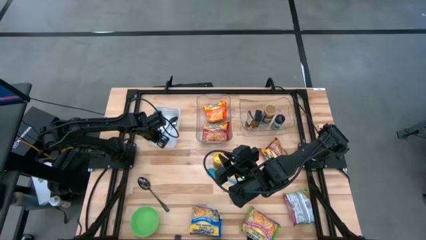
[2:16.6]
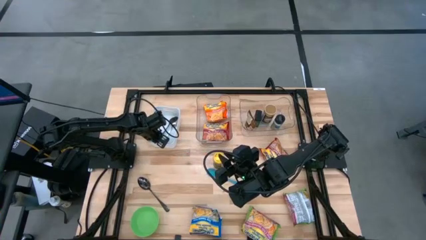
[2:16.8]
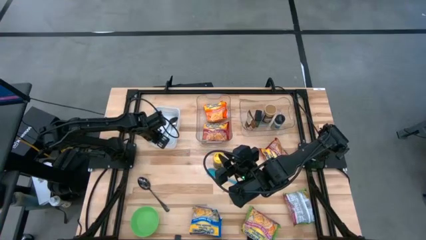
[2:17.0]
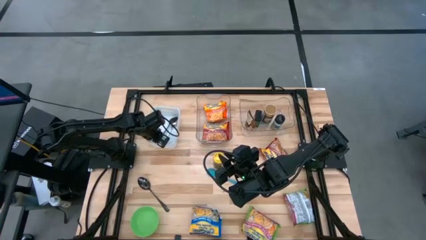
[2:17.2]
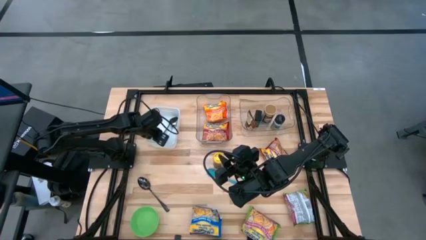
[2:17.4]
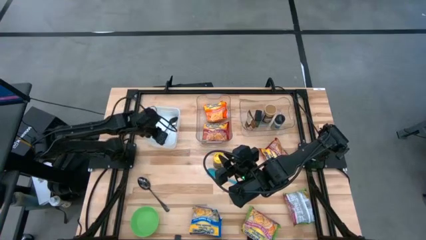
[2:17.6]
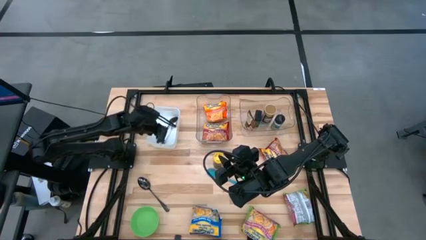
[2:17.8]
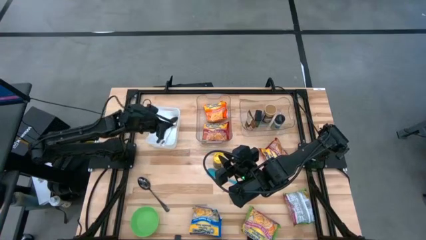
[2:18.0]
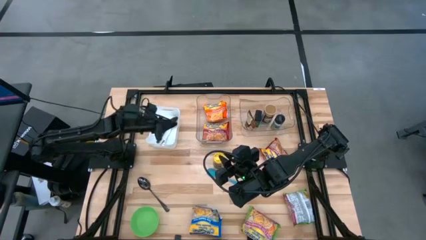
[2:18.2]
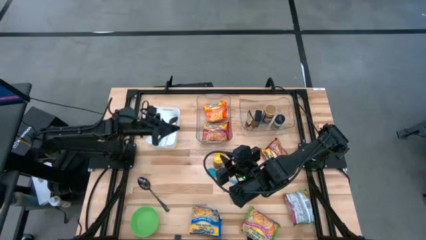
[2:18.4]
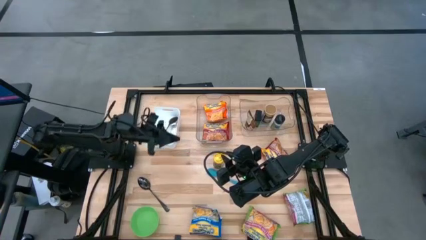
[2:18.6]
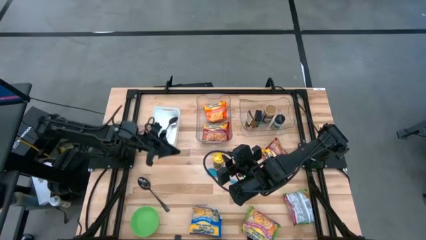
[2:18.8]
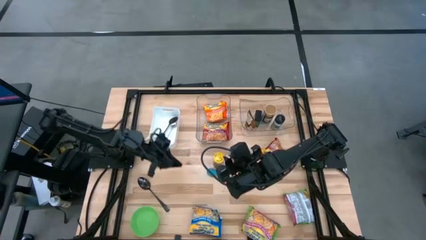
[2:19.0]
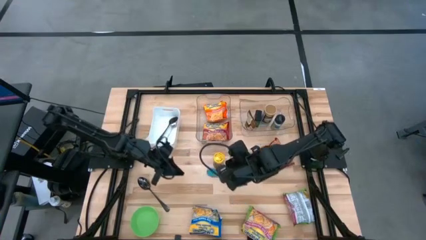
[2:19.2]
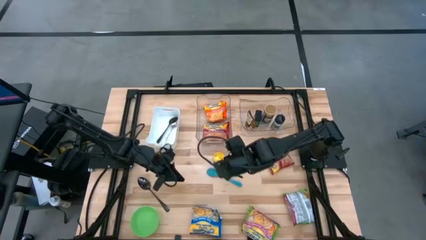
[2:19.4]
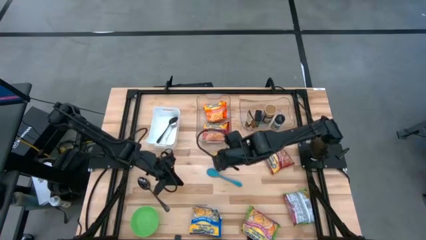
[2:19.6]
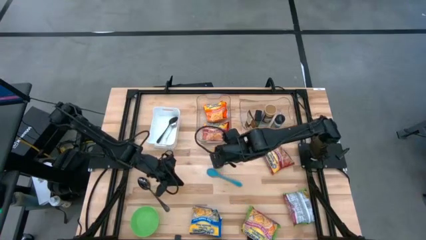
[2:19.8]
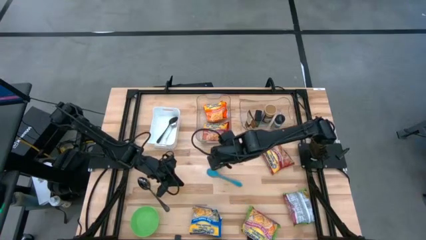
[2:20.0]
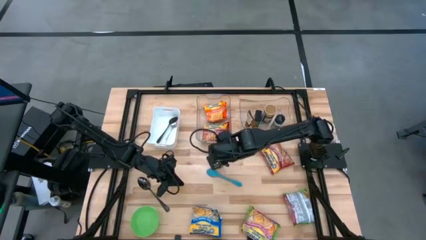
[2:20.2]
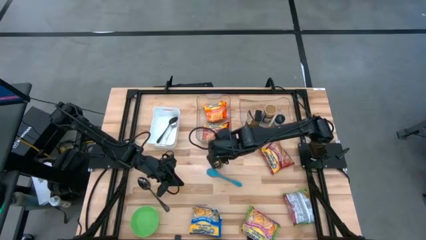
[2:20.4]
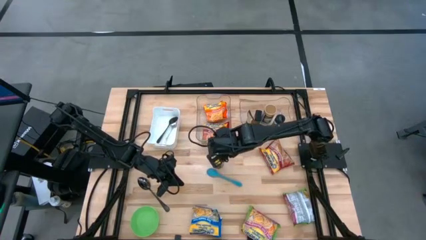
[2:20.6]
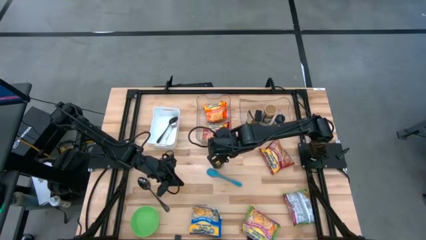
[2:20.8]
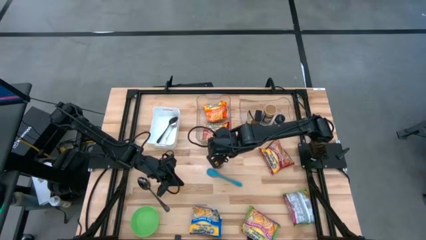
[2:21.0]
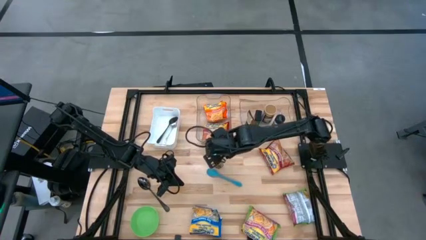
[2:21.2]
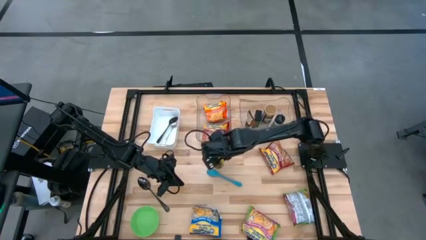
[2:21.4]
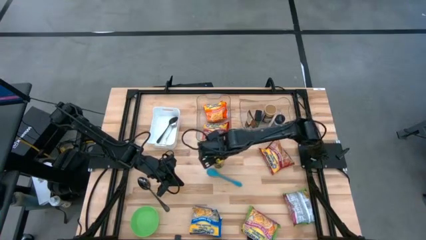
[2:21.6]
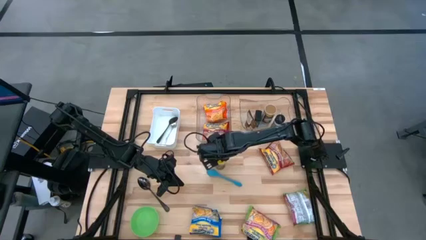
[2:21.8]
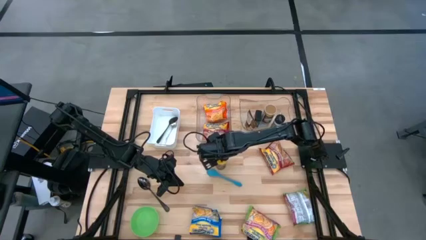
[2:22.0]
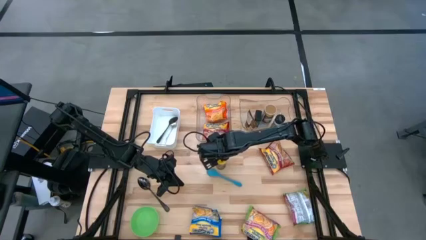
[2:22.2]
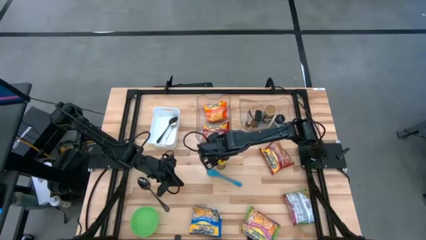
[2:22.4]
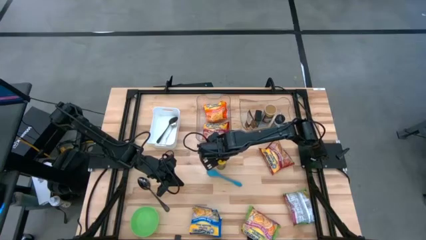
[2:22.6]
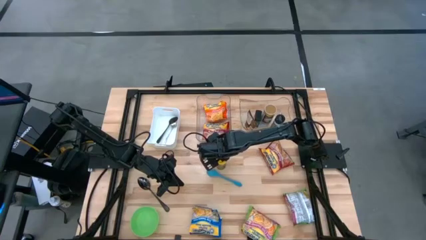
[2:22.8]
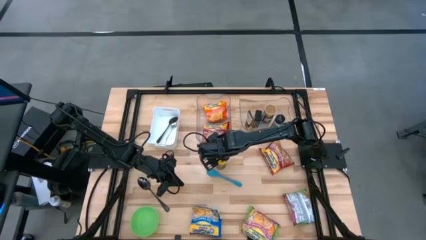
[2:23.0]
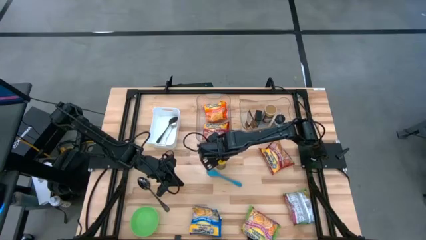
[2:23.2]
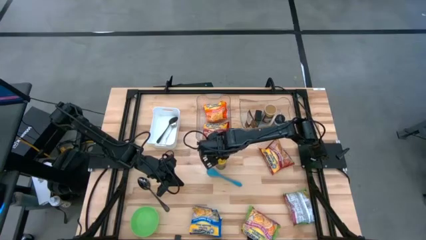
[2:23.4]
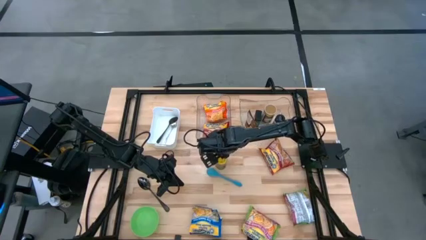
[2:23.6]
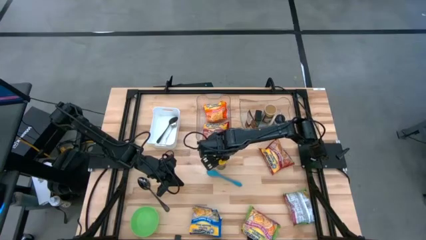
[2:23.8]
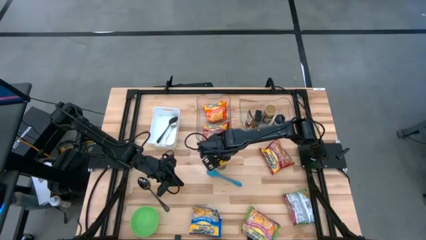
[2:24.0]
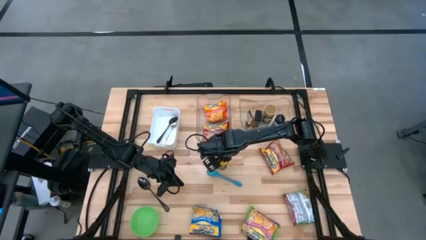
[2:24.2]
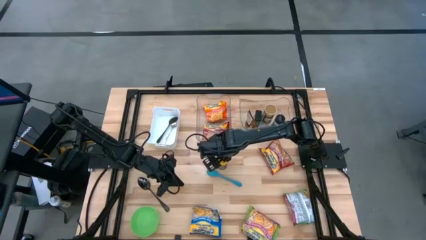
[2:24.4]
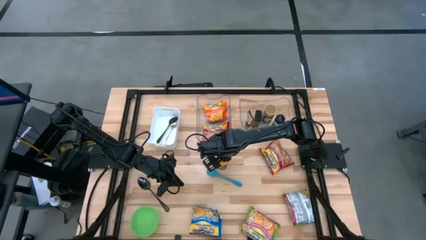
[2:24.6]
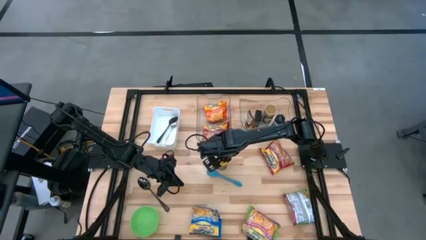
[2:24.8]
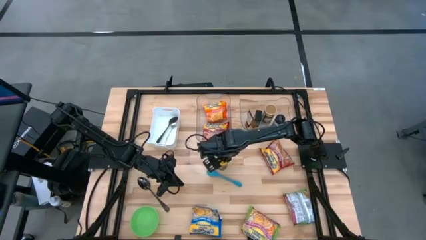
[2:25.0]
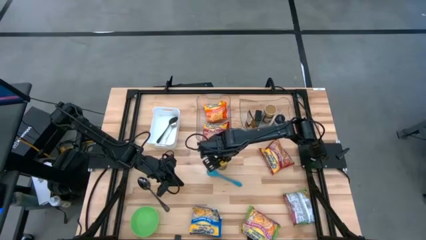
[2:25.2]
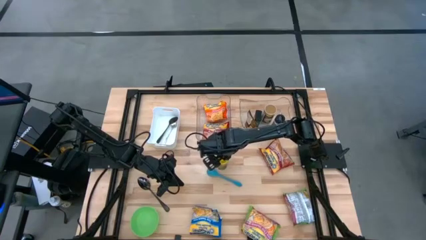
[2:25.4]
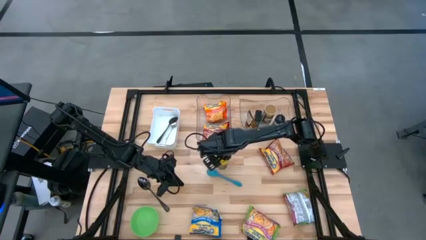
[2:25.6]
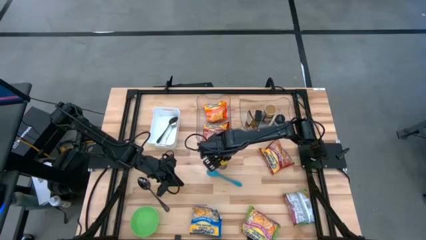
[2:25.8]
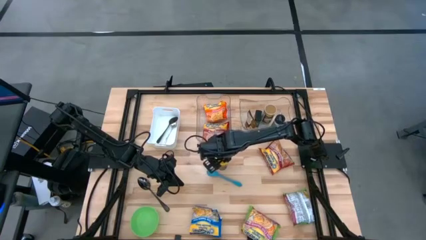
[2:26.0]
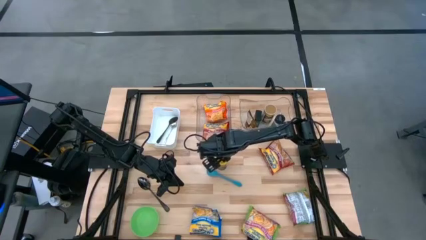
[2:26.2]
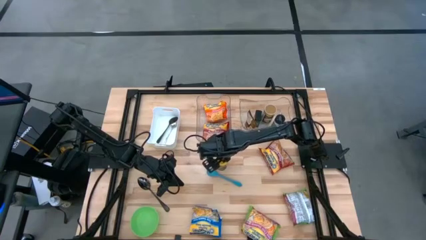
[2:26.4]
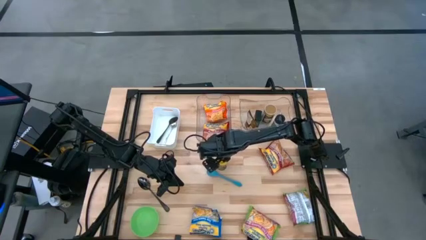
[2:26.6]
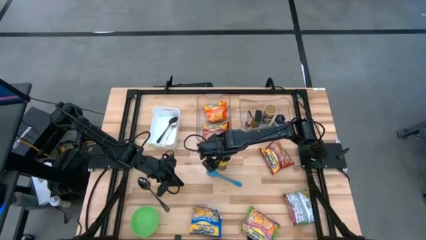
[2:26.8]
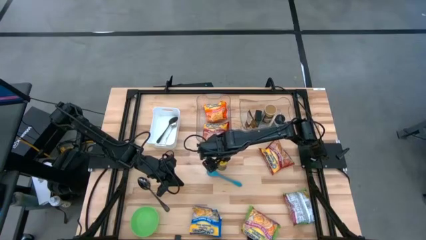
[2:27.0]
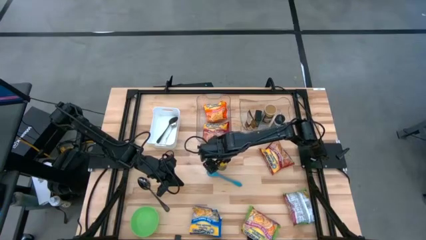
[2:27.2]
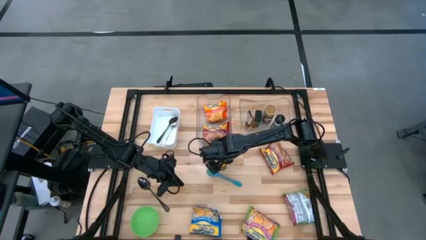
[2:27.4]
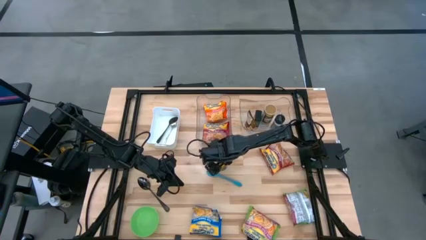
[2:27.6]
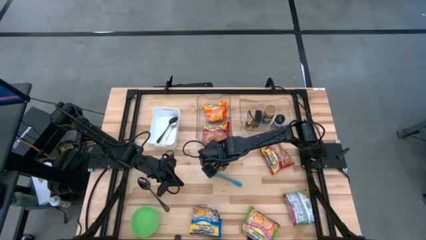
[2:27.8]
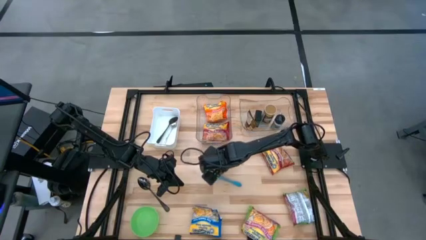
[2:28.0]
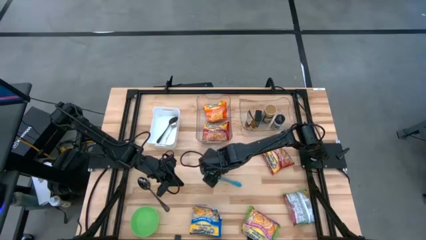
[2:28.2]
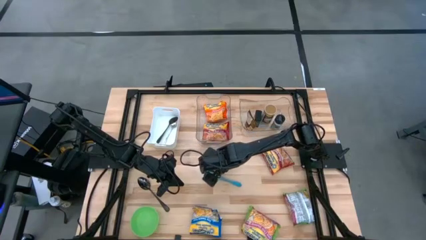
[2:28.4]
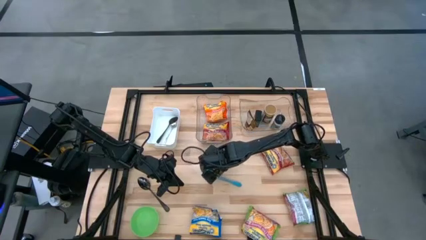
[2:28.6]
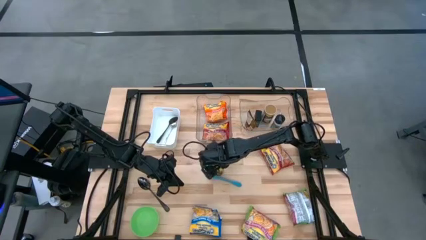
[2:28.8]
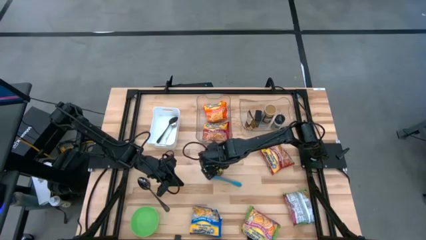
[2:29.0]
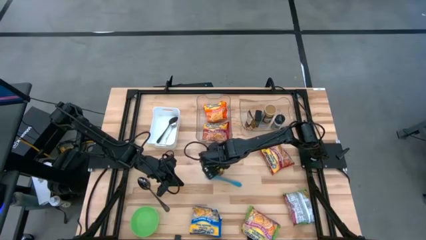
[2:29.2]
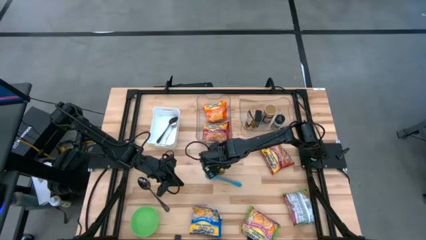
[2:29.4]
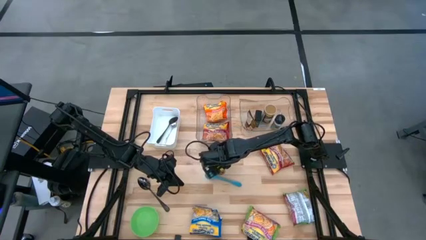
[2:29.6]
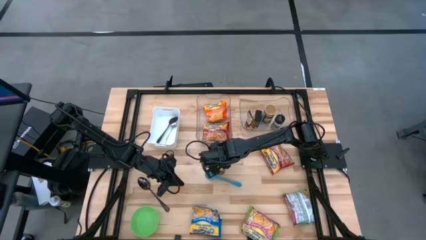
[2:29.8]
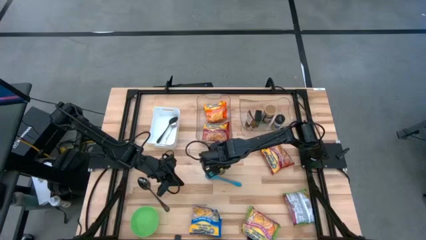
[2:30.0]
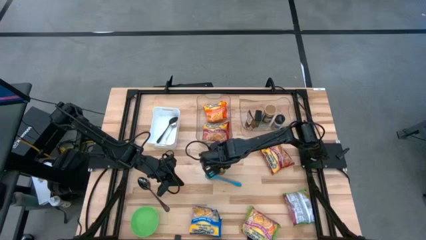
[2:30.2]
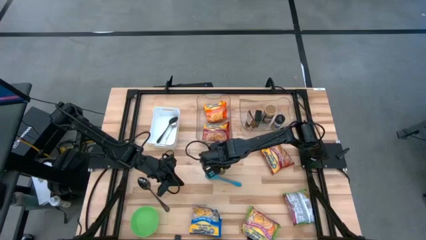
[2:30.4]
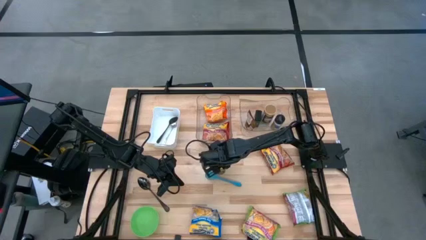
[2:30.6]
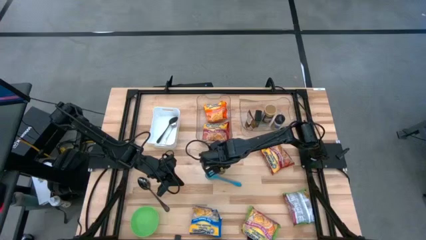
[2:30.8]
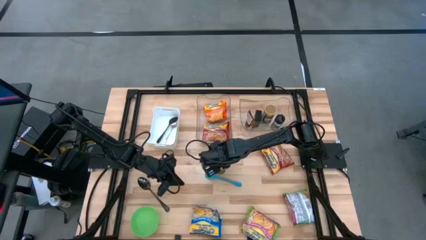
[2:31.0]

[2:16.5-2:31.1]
Task: Pick & Place Food Item
Put the yellow spice bottle into the right transparent bin

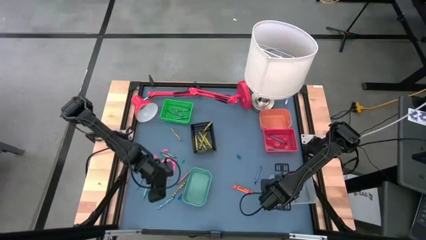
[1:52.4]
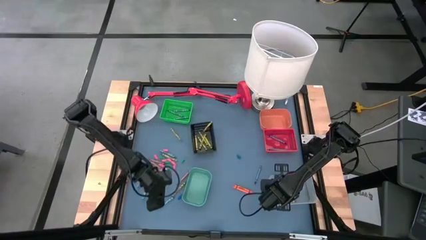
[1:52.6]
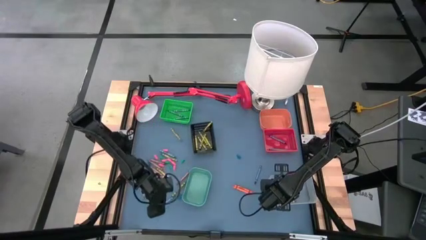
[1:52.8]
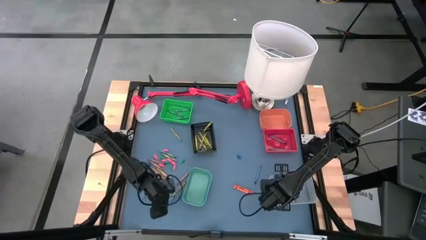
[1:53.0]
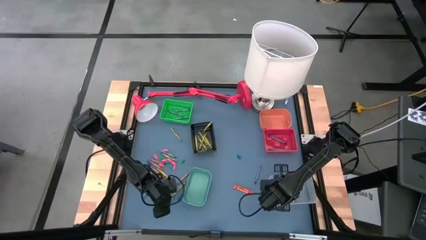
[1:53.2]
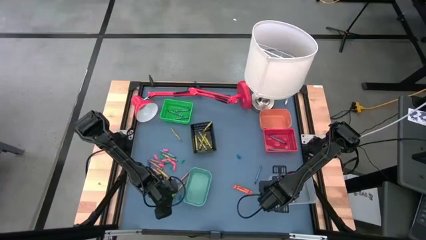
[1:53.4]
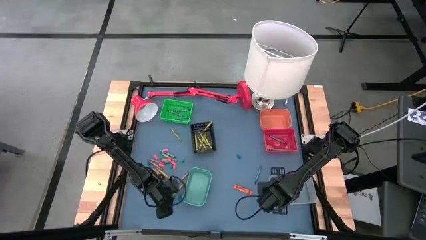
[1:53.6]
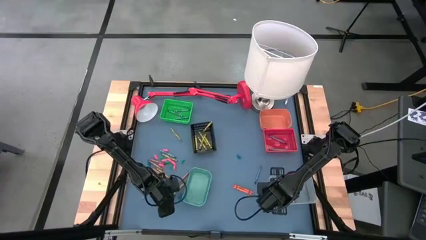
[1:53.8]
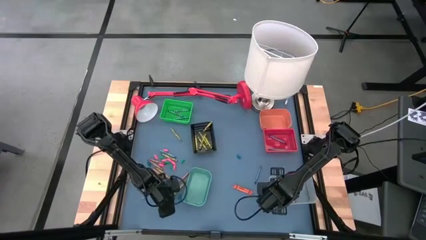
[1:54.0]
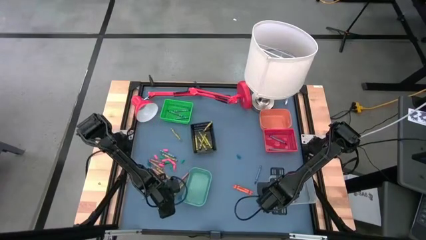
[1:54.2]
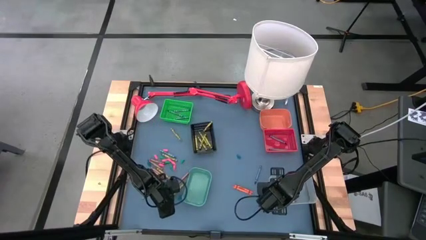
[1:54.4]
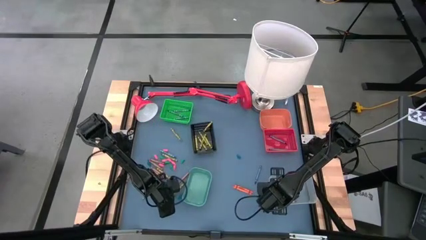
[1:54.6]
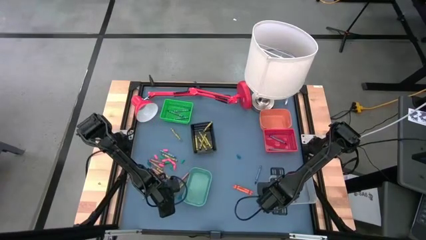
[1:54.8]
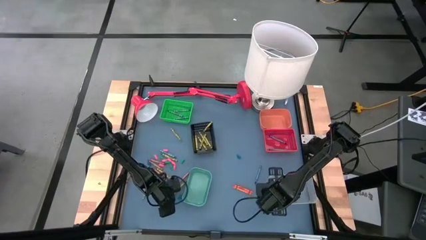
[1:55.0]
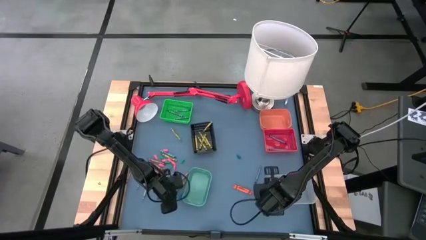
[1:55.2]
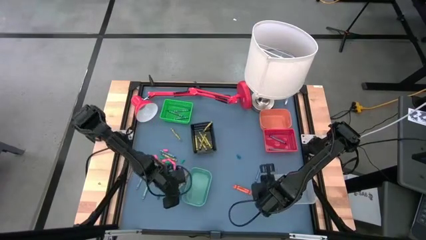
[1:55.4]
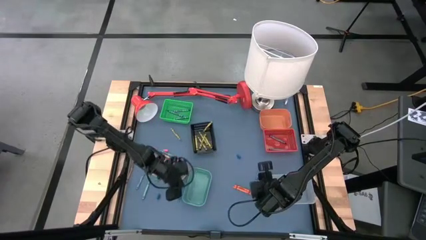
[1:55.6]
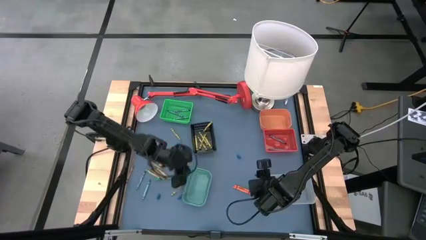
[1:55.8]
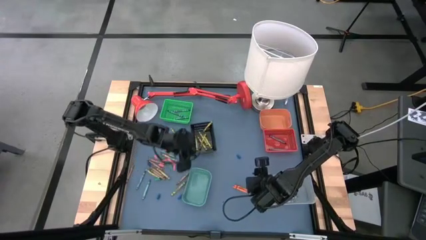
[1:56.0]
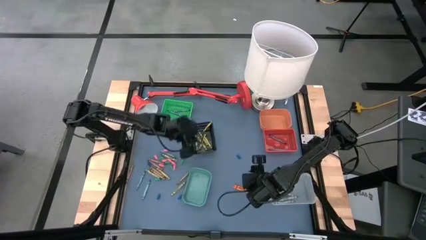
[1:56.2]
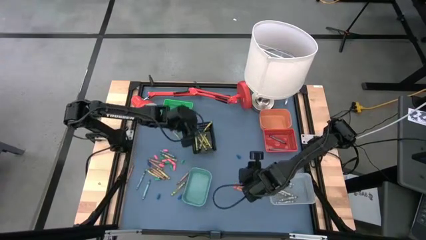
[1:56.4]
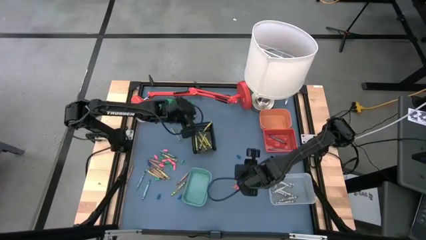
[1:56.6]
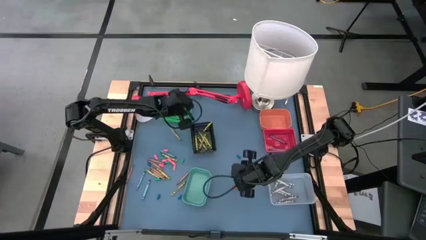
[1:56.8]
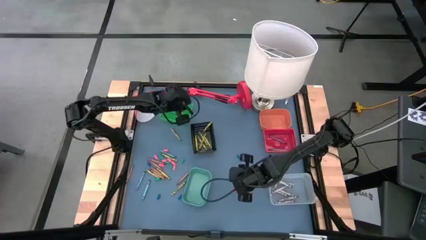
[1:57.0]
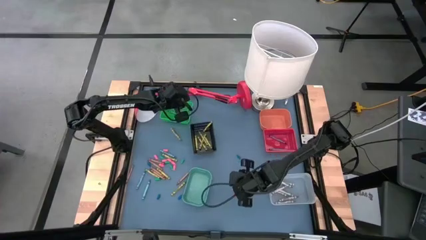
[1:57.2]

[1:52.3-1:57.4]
Task: Sort crayons
Put the blue green crayon into the green bin
